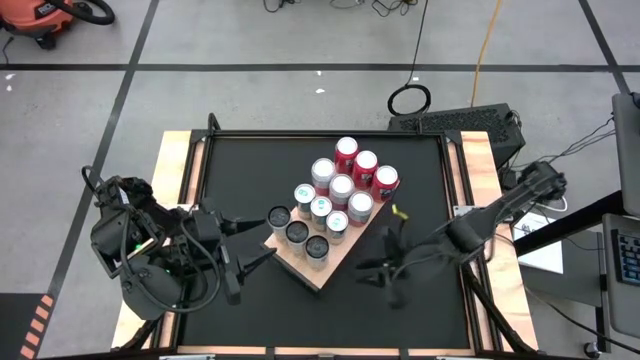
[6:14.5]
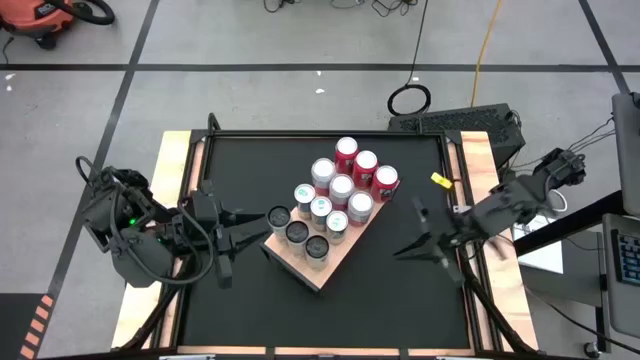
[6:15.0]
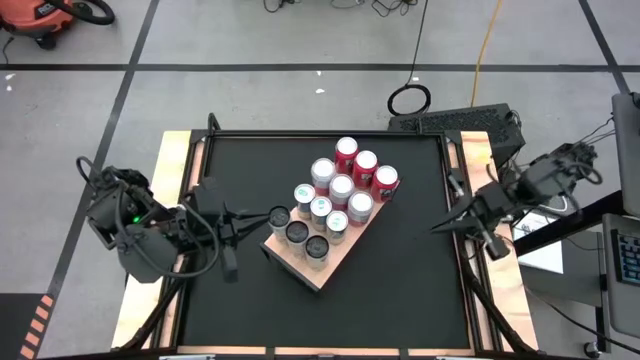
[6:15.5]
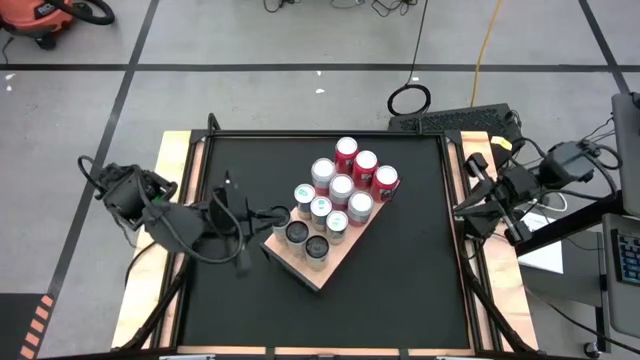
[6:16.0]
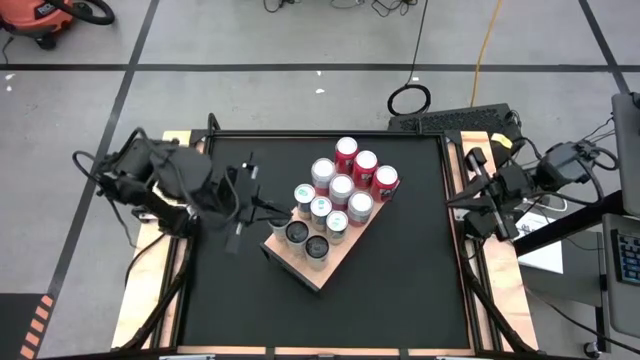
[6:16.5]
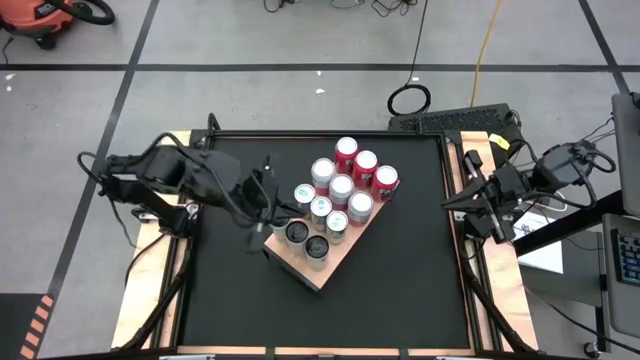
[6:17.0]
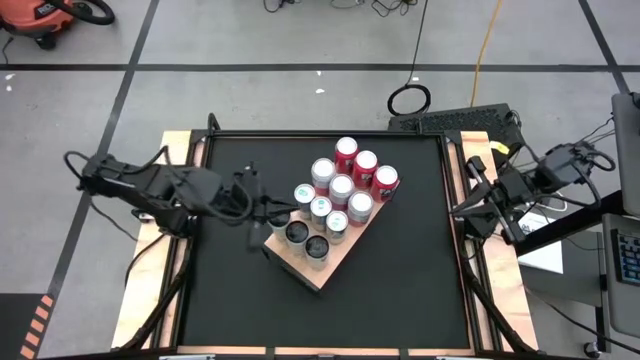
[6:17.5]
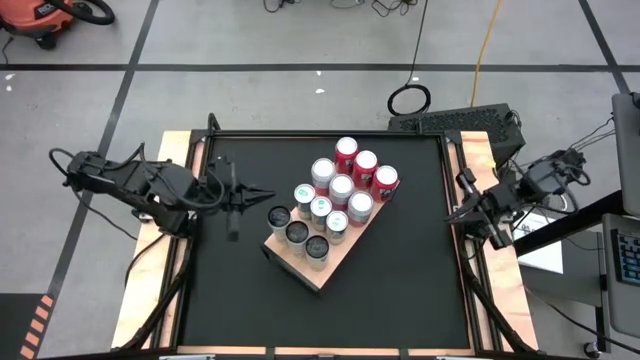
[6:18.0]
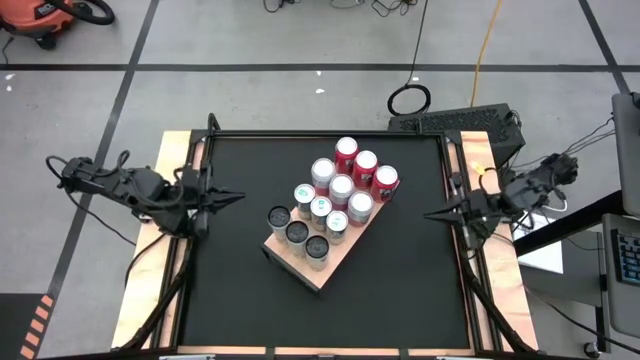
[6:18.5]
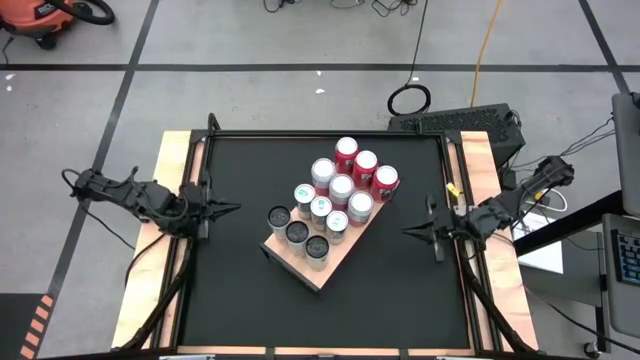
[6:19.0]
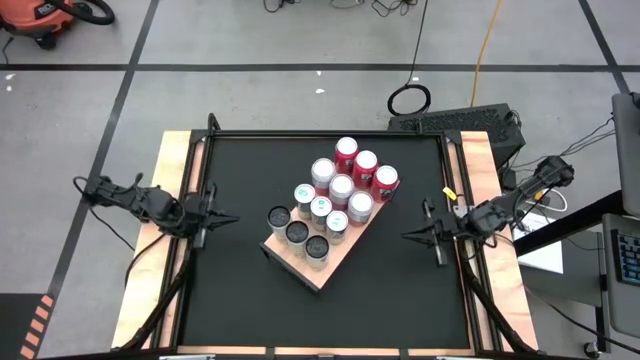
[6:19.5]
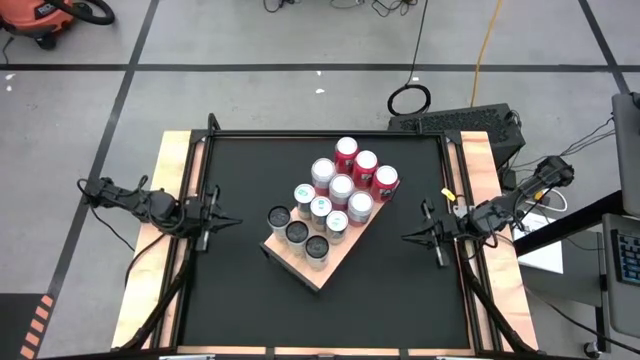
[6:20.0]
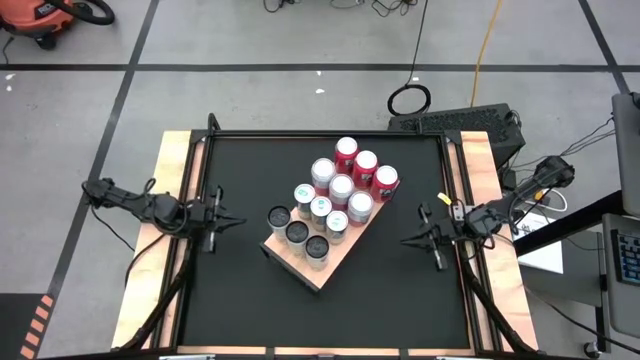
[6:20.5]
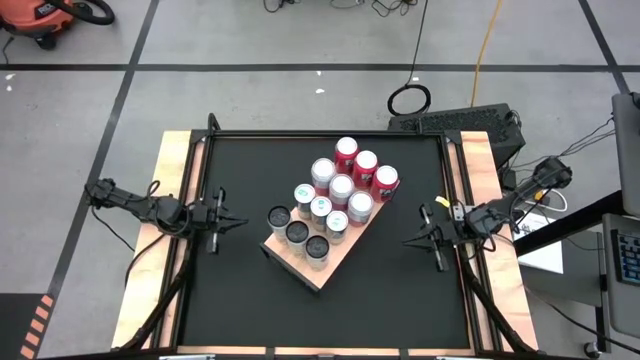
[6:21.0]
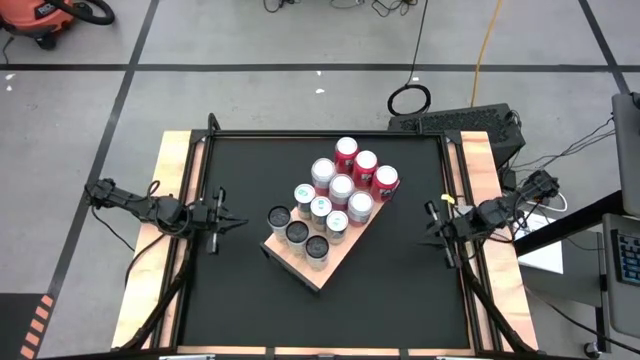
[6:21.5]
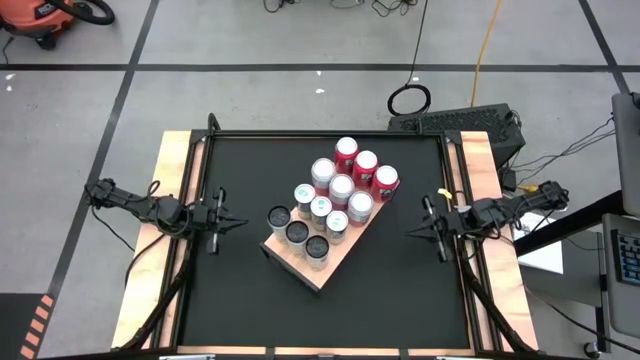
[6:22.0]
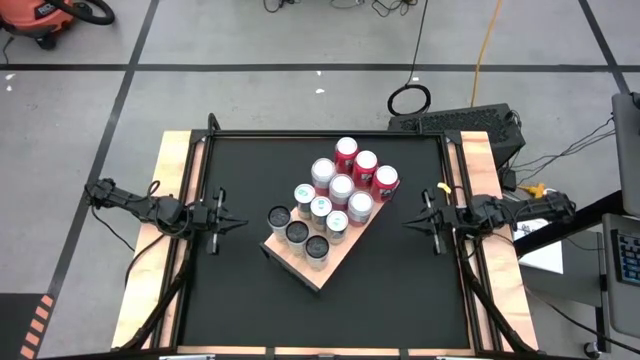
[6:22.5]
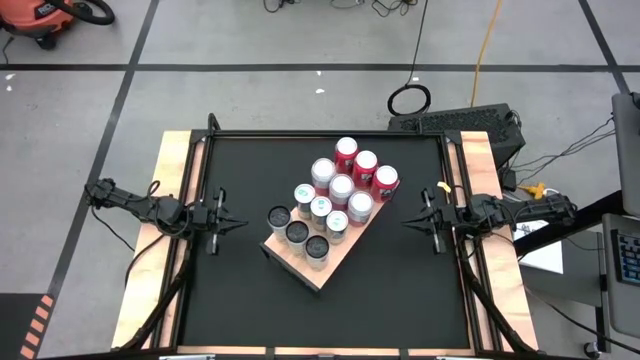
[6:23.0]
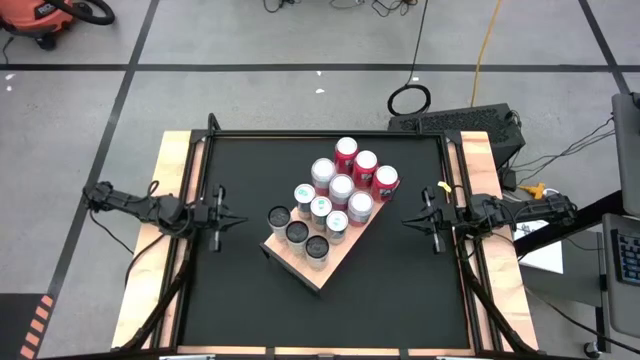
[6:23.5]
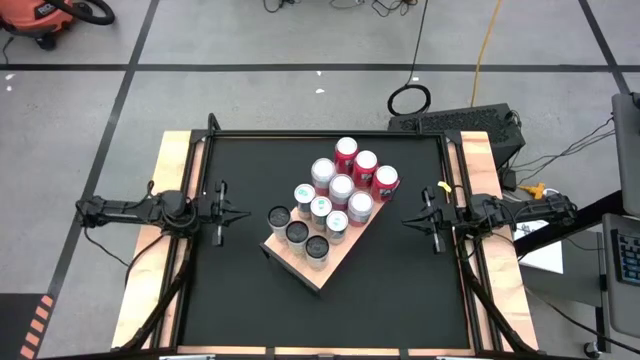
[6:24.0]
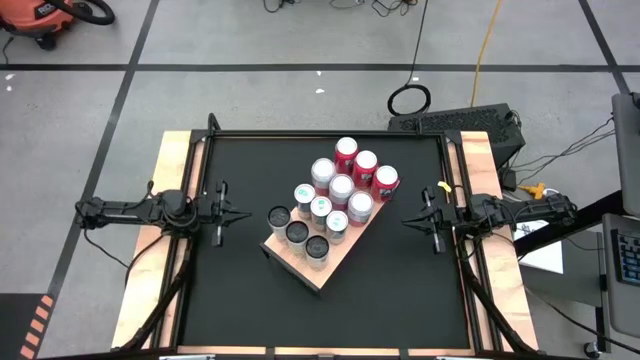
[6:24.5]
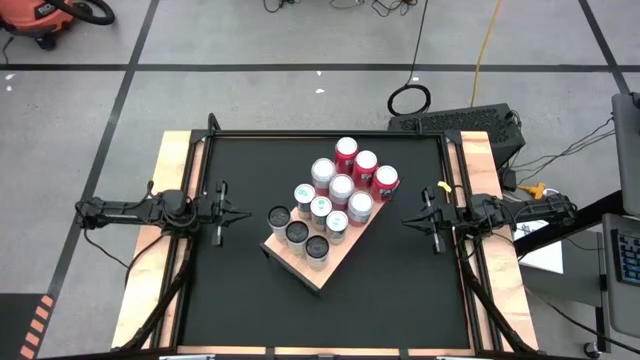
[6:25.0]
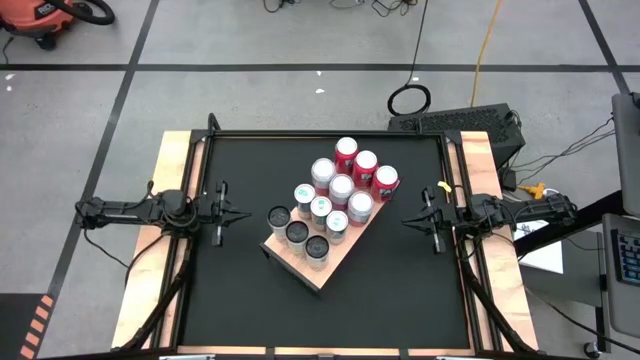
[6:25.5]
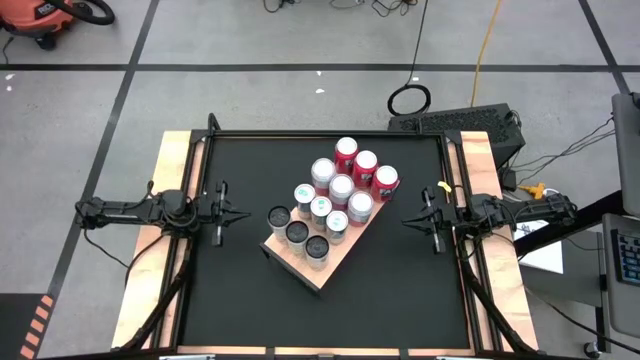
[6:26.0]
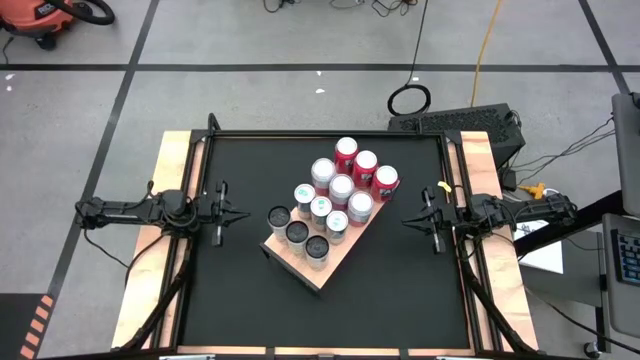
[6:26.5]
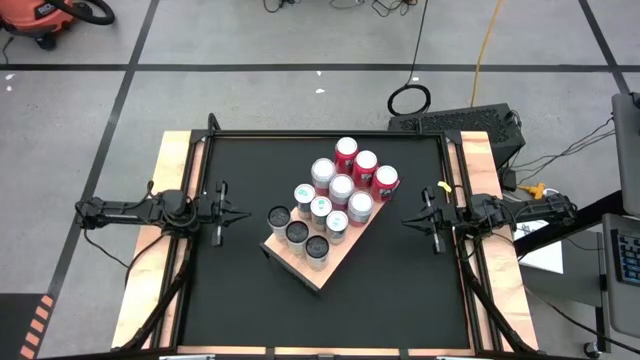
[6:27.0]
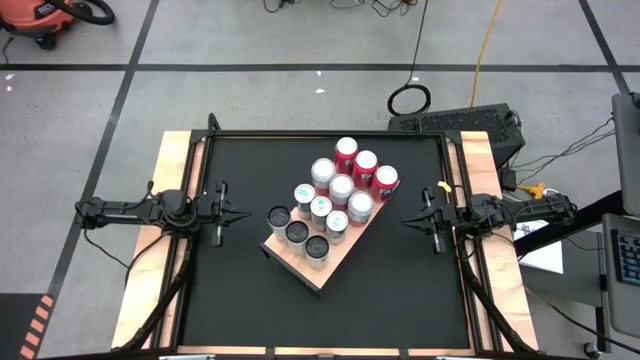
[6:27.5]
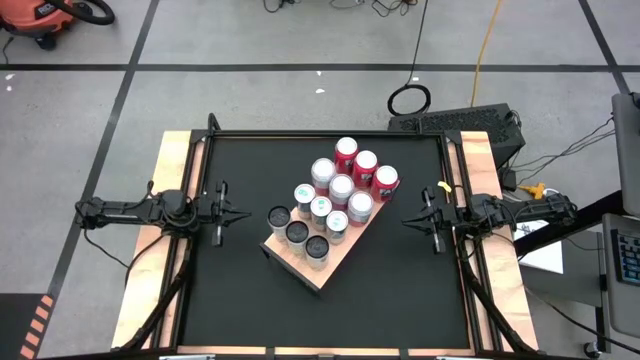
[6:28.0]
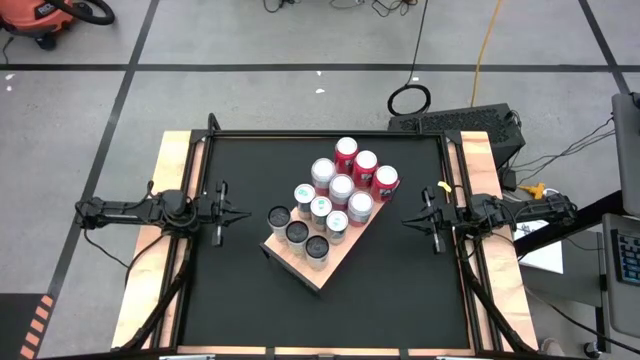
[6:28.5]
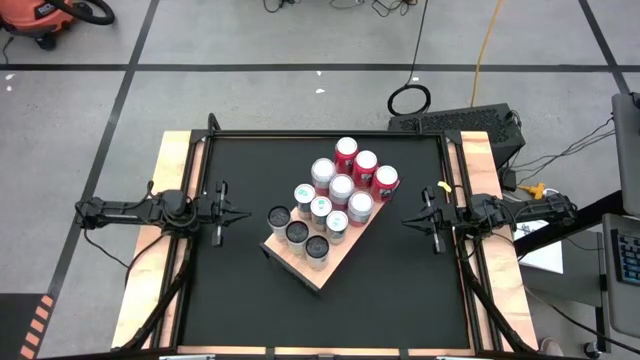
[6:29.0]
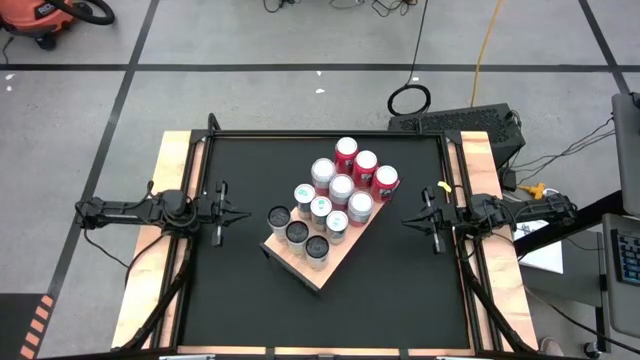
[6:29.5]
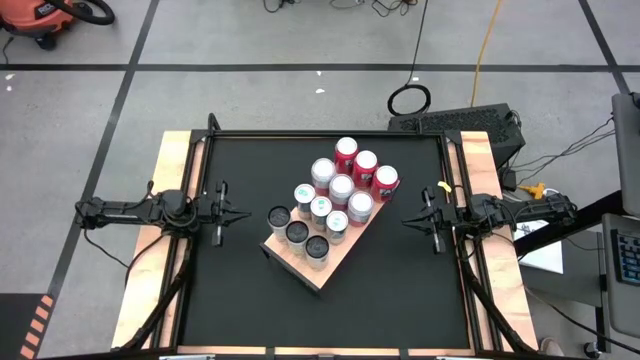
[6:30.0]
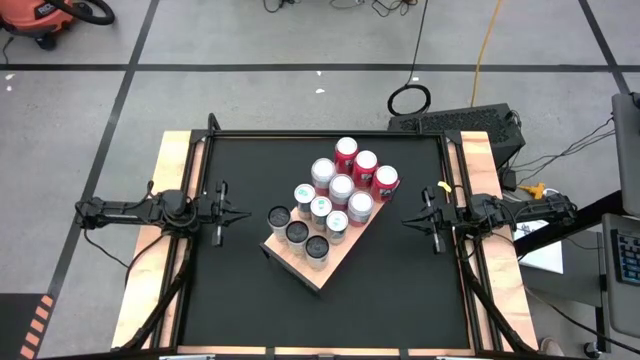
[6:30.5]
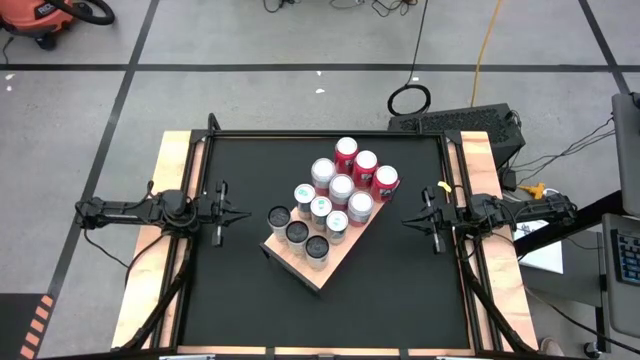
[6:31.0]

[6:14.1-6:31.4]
Task: Place canned beverage on shelf
Return to Home Position

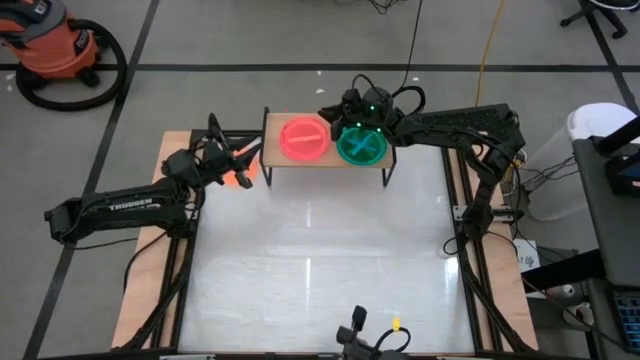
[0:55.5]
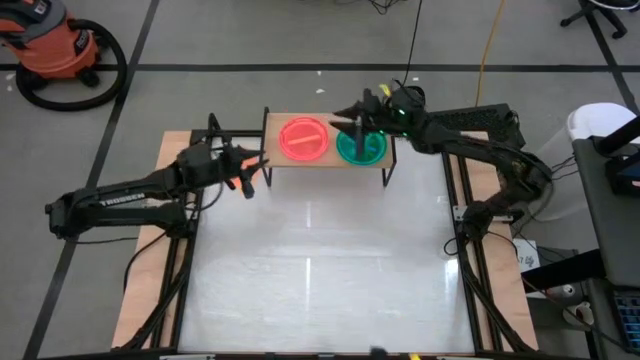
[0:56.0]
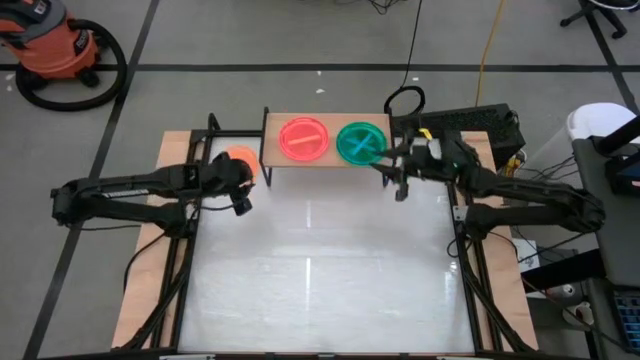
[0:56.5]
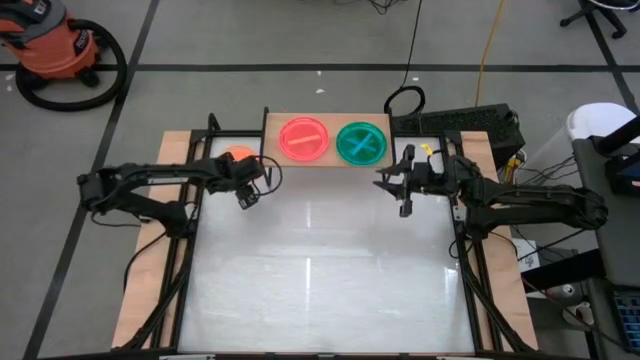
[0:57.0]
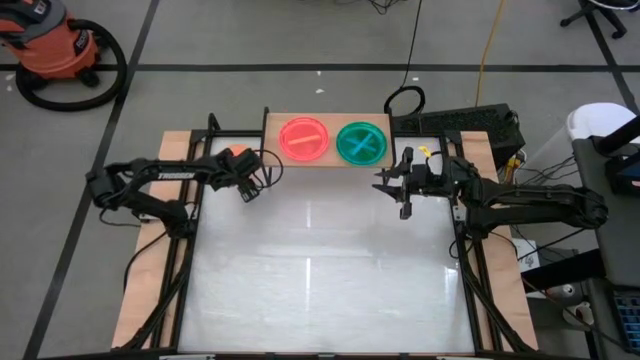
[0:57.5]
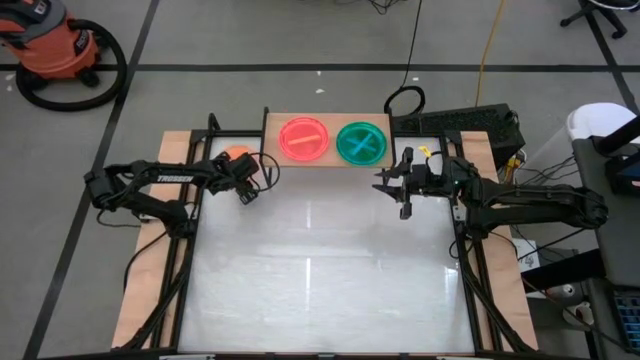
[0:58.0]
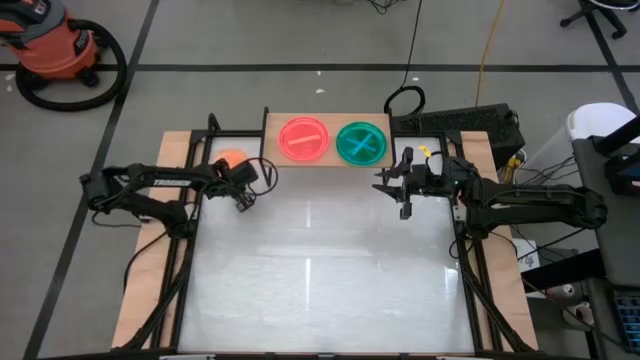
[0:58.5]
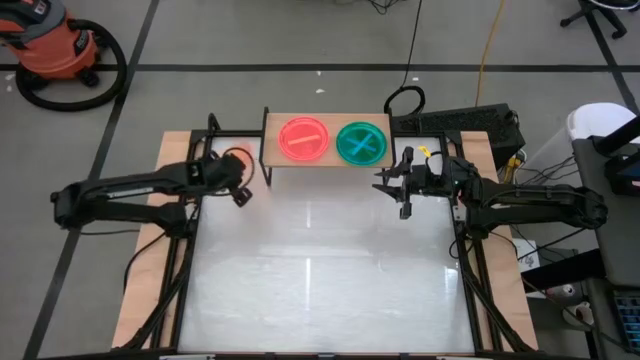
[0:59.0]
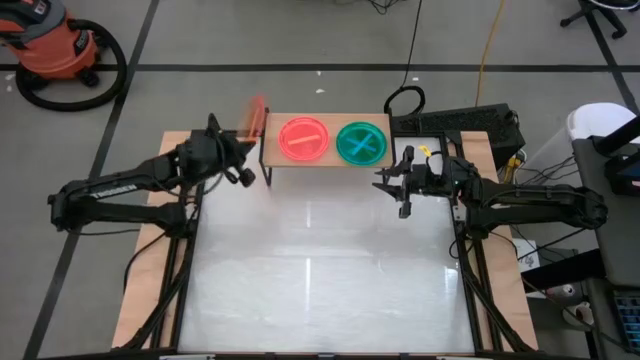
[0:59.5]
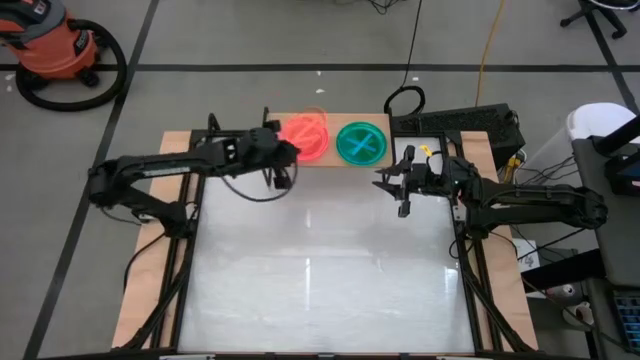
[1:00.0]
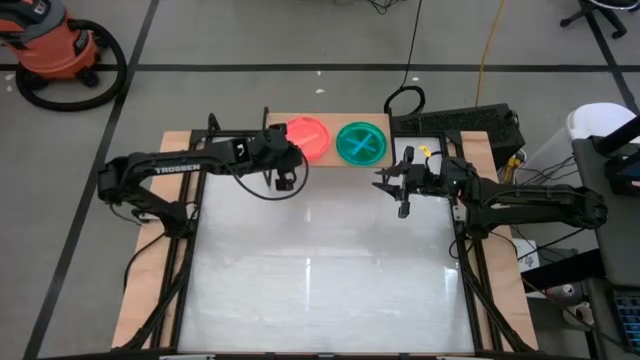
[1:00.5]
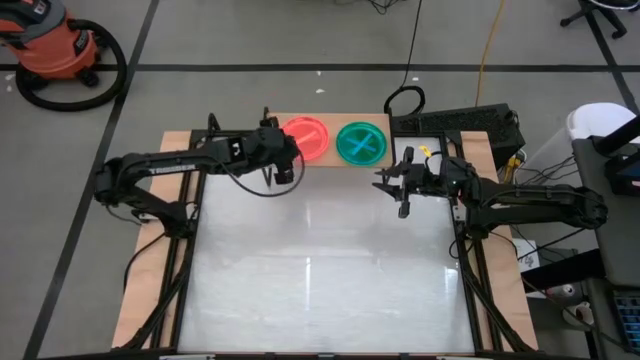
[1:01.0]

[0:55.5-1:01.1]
Task: Place and stack plates onto a shelf
Stack the orange plate on top of the other orange plate on the shelf
